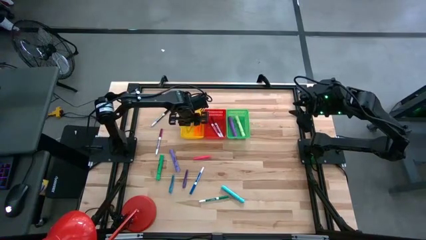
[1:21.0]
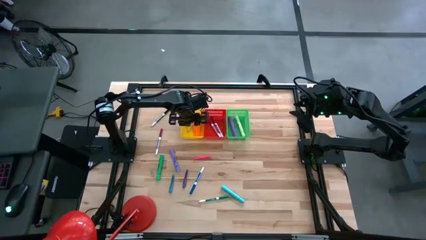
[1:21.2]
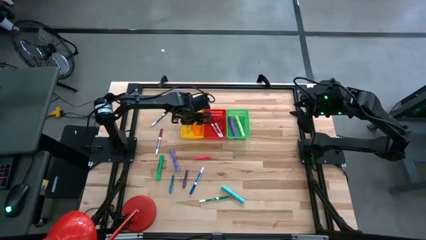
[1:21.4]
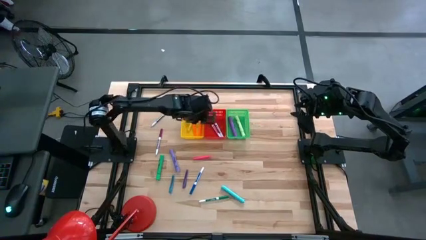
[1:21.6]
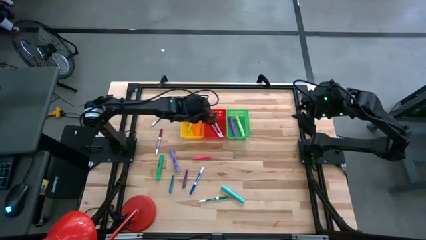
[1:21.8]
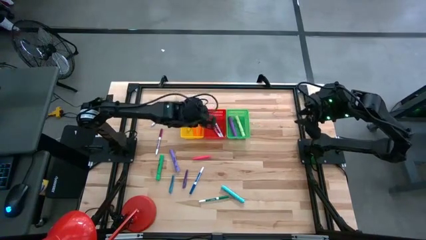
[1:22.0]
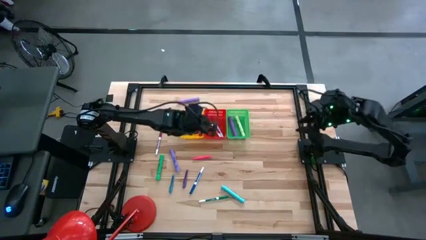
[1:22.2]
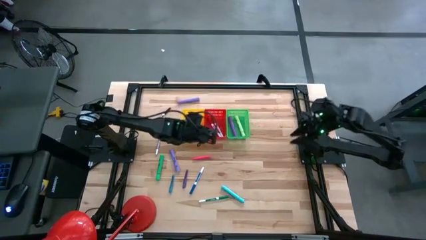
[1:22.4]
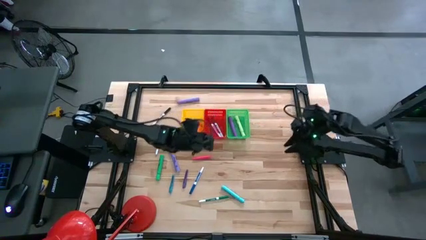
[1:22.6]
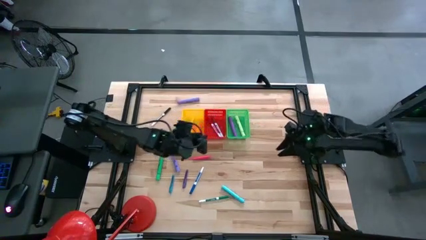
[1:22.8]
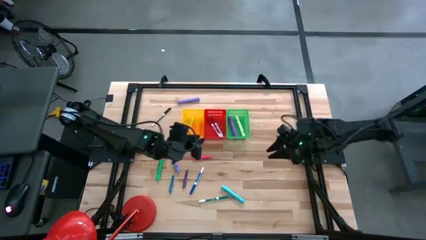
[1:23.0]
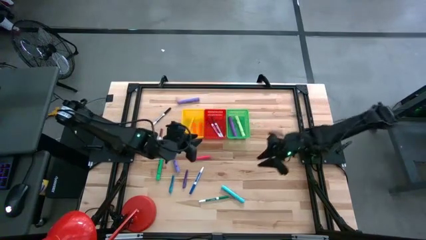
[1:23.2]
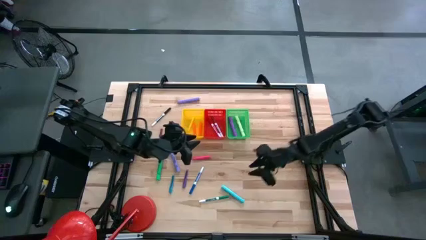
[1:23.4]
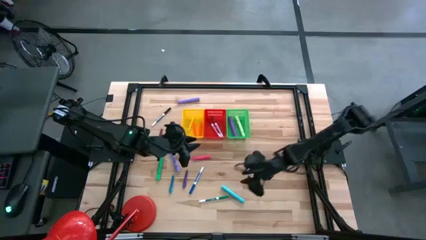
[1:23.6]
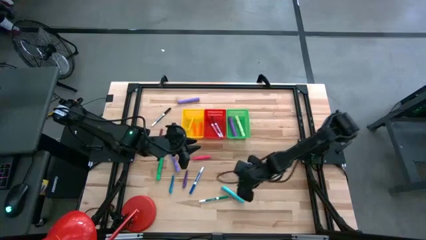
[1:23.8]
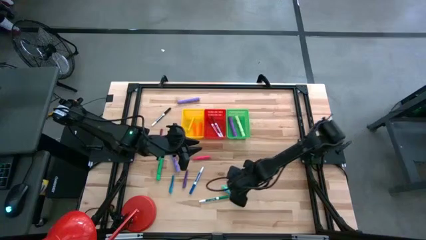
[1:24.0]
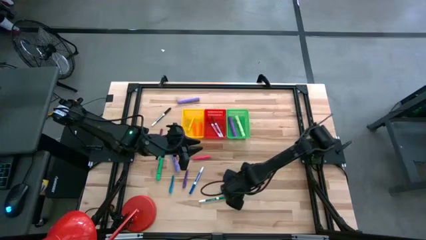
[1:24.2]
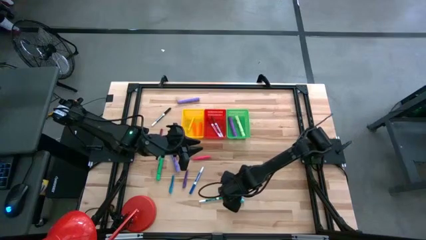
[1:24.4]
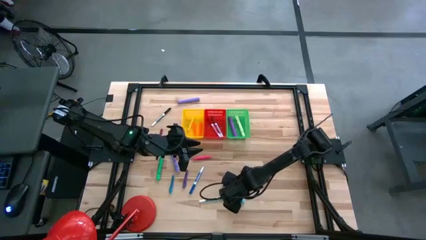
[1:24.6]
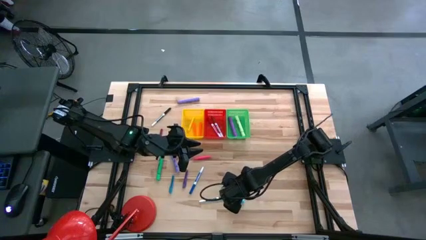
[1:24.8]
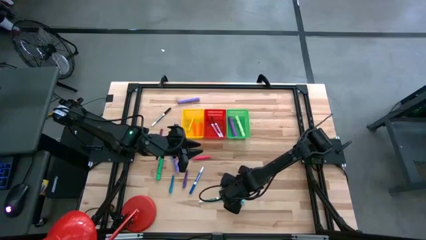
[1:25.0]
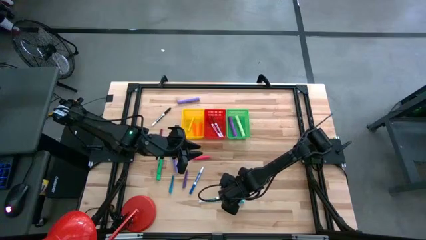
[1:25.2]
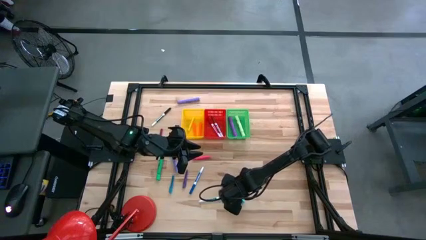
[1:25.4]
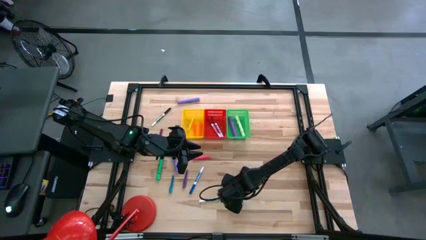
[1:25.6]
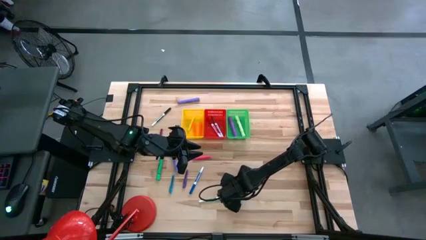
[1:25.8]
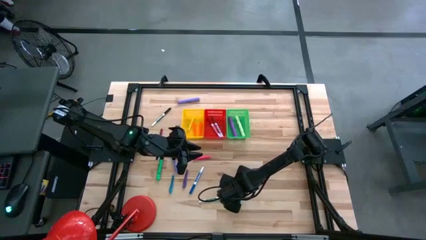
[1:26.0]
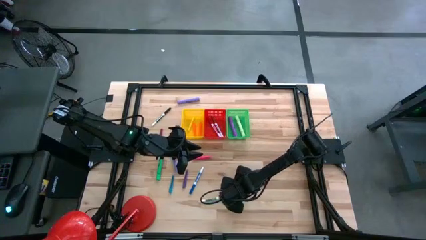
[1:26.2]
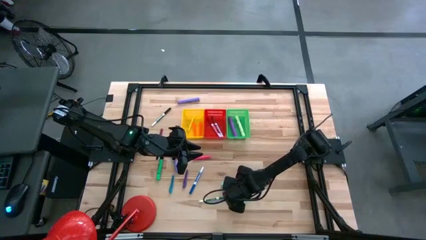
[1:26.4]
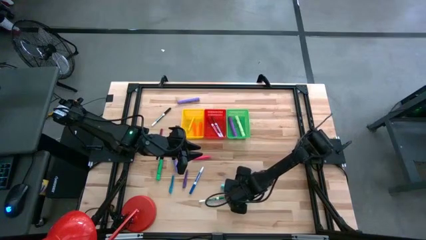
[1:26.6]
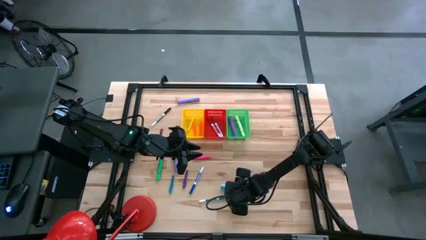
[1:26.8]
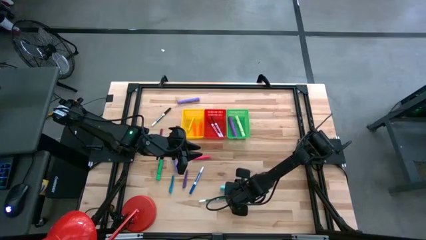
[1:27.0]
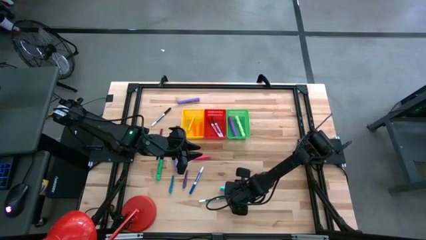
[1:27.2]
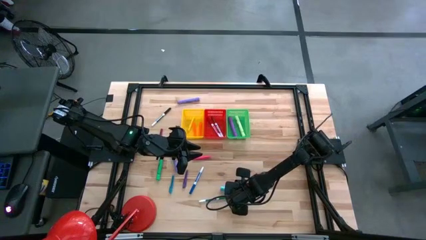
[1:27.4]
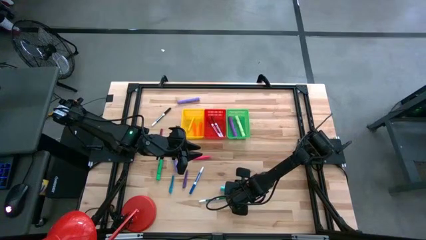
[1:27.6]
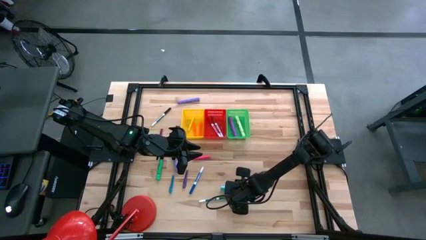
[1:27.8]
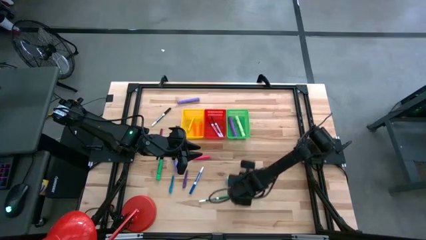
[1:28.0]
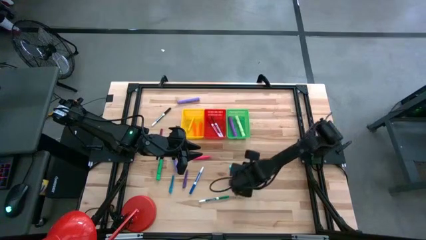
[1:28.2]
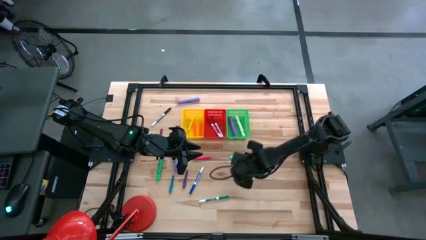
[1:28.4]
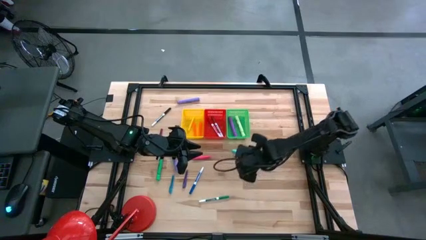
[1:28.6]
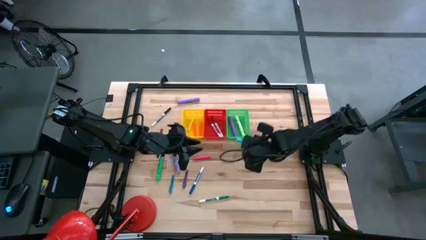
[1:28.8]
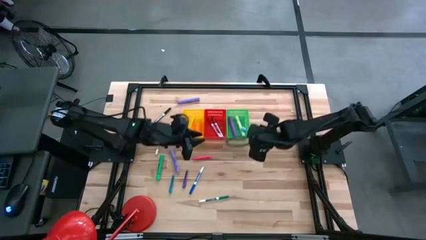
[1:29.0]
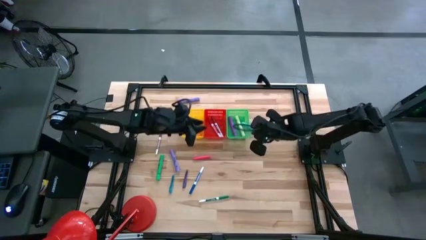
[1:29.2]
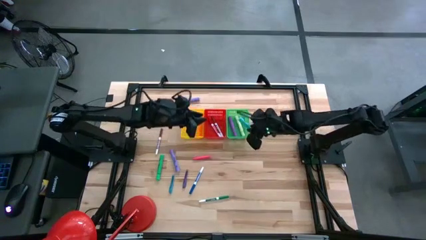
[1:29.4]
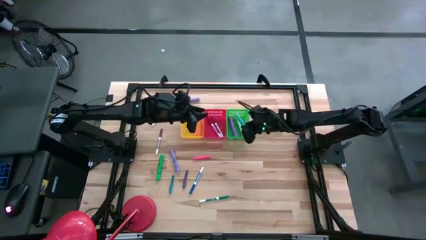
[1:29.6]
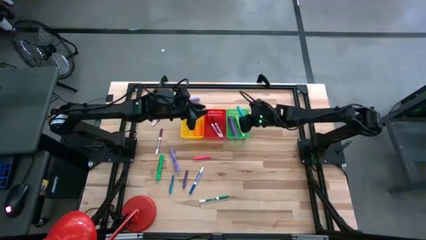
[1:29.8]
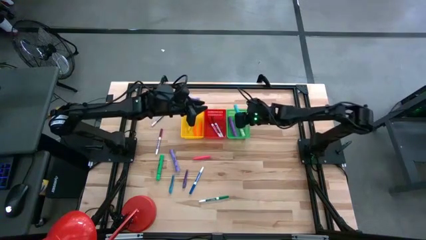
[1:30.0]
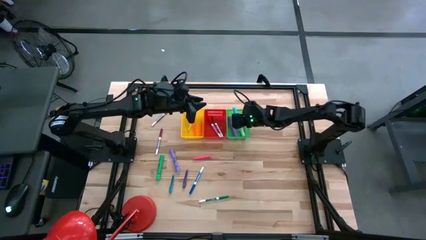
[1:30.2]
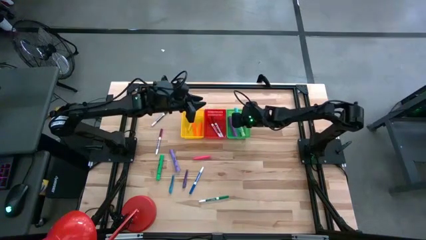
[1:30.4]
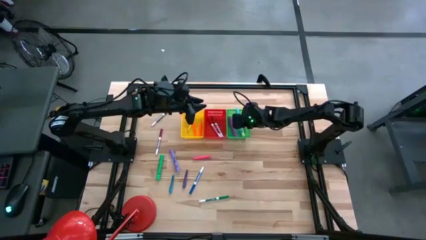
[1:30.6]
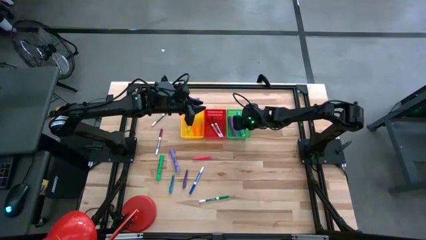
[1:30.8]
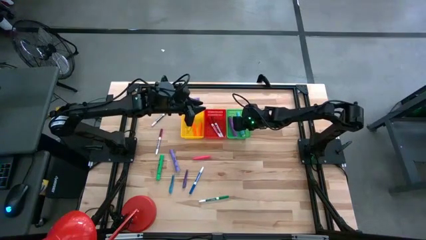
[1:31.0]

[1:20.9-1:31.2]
Task: Pick & Place Markers
Put the blue highlighter into the green bin
